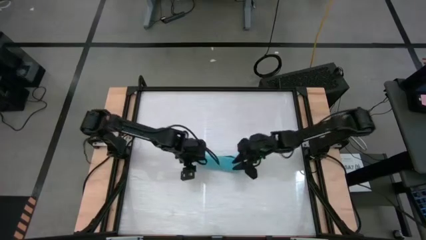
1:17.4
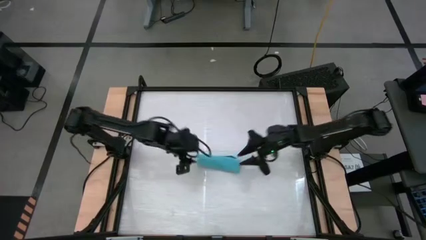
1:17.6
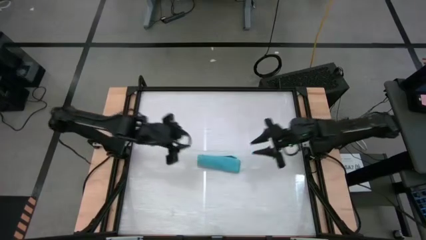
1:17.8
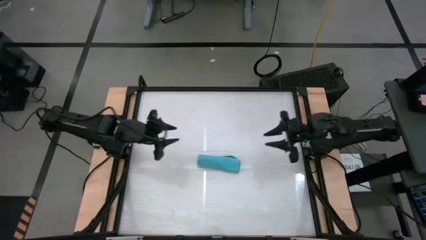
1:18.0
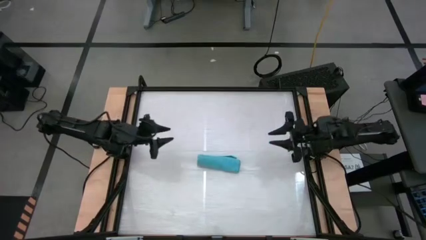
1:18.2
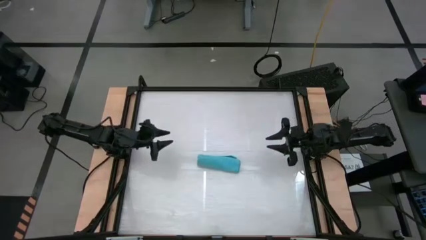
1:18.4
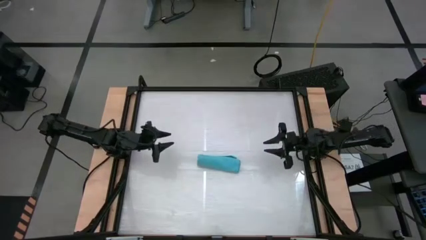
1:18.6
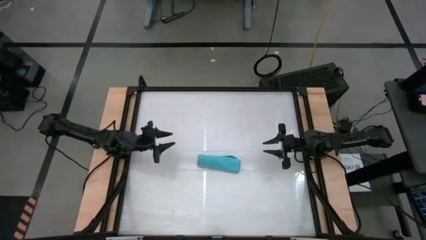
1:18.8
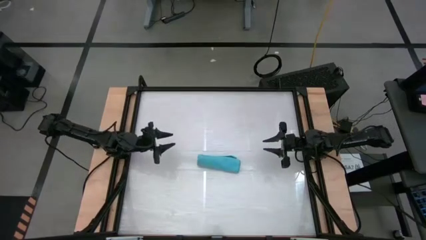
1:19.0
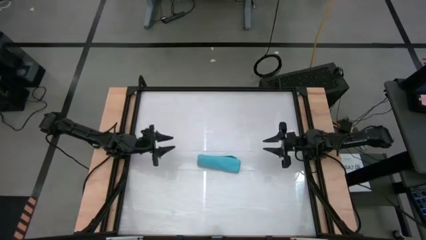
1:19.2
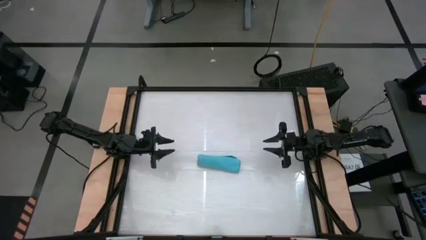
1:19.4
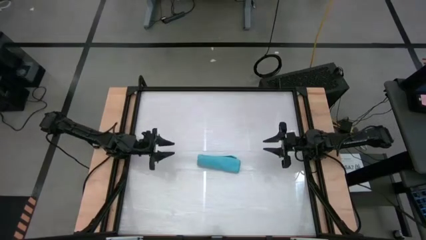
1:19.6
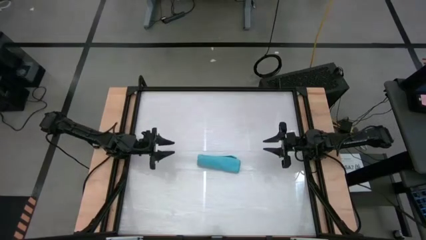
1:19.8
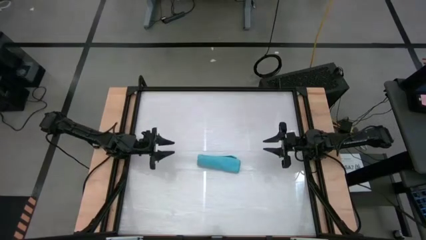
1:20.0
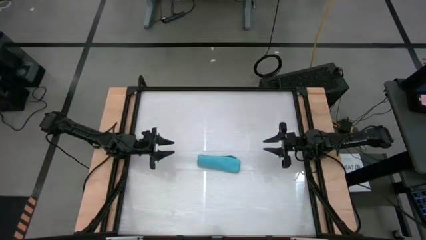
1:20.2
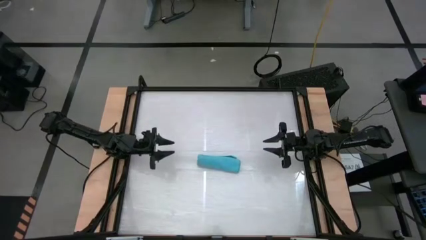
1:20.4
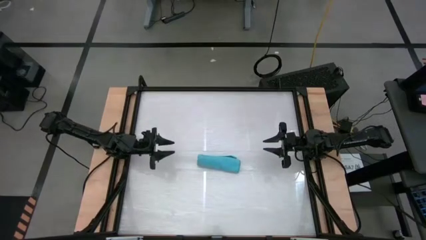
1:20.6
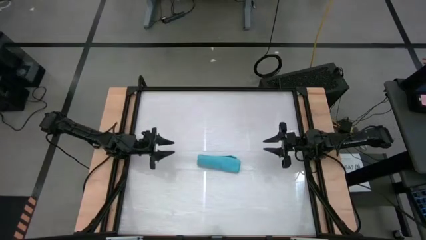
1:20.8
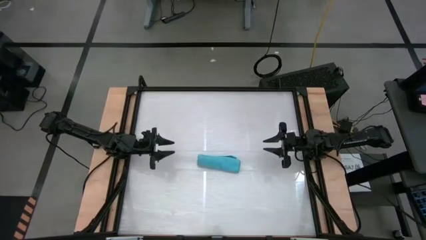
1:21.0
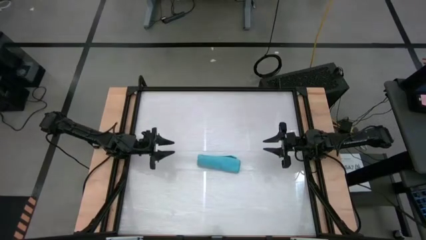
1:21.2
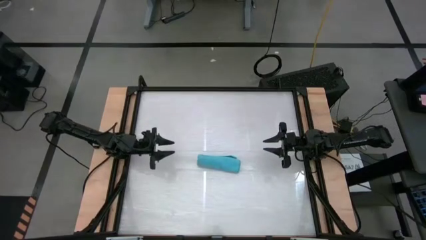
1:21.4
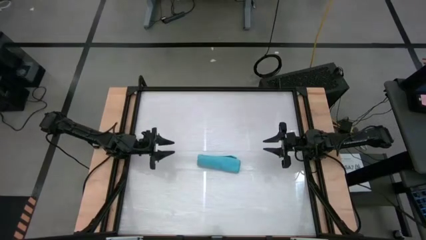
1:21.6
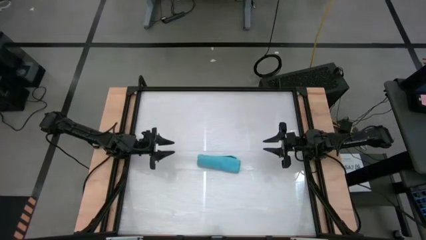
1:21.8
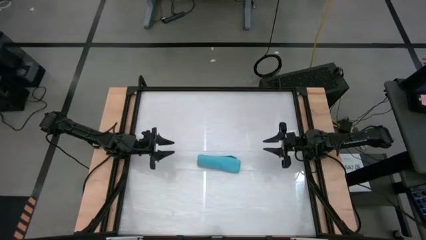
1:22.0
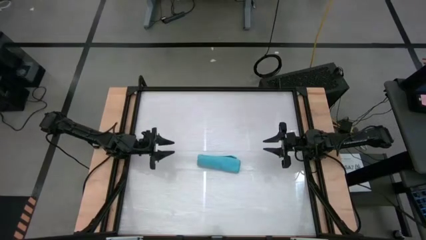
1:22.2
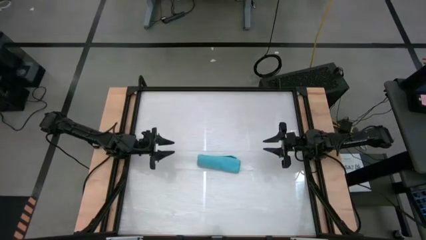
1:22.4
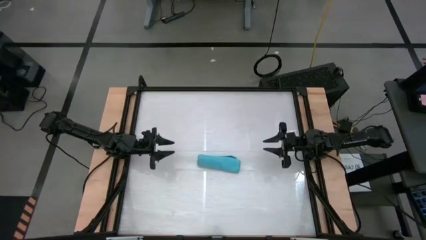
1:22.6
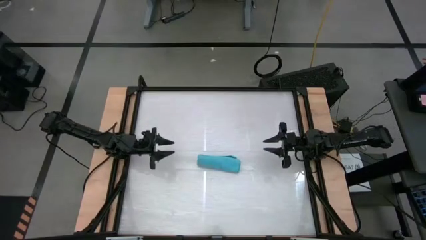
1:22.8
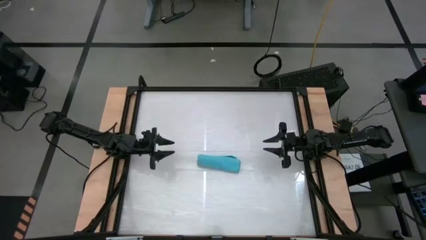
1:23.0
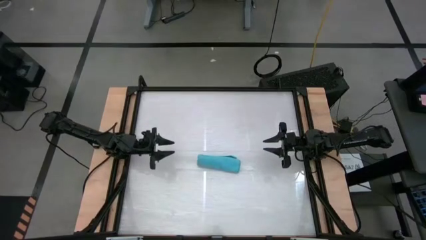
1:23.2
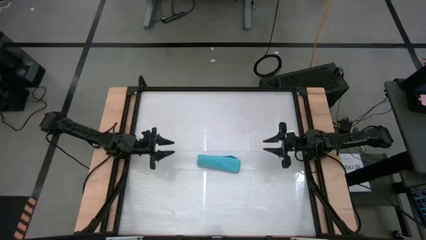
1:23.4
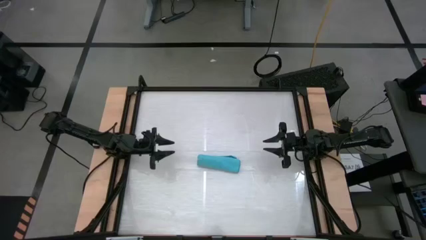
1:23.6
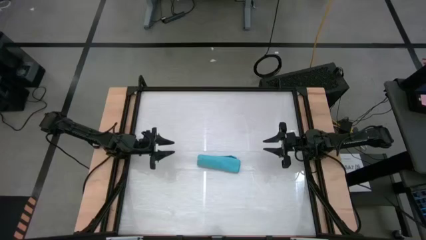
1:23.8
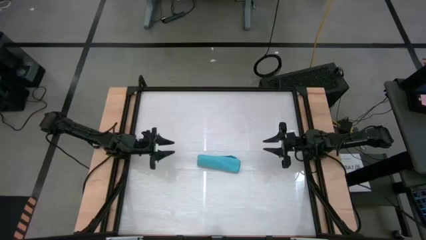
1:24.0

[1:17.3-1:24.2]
Task: Roll towel
Return to Home Position

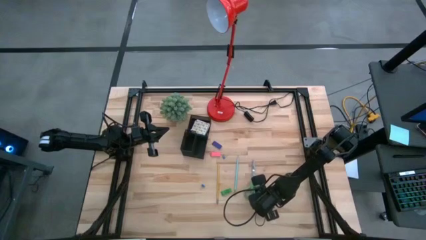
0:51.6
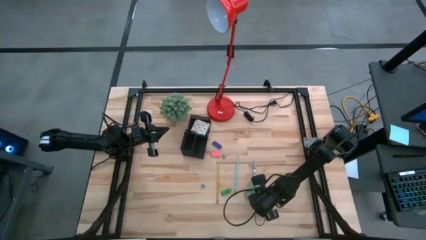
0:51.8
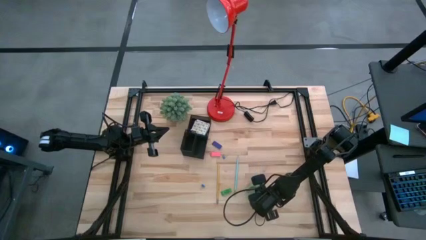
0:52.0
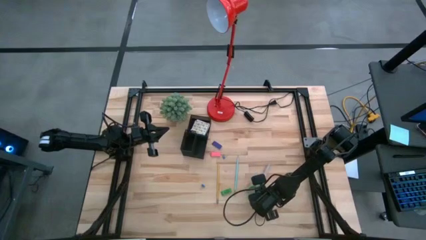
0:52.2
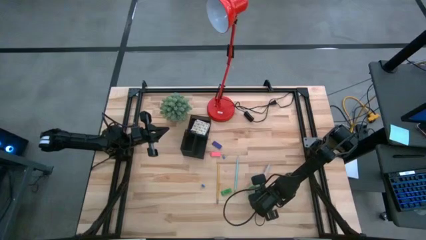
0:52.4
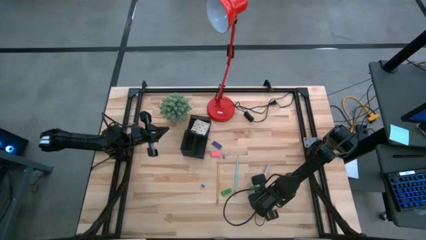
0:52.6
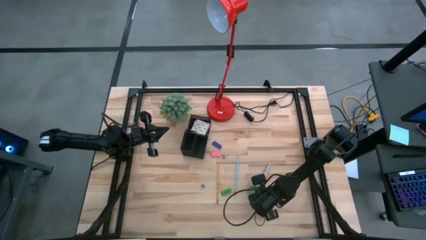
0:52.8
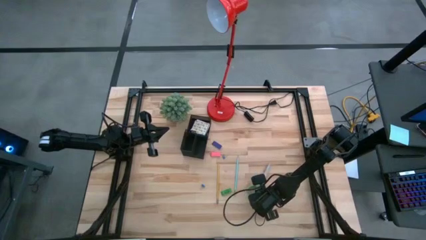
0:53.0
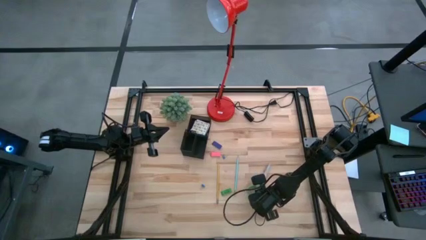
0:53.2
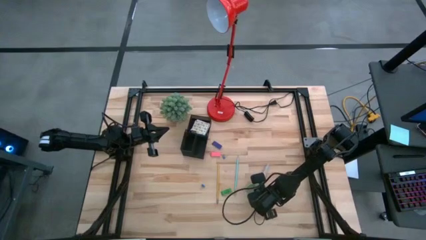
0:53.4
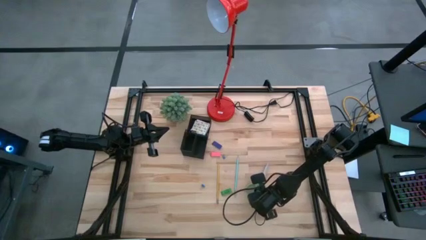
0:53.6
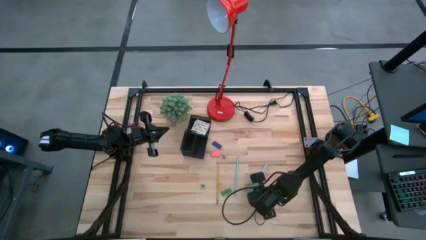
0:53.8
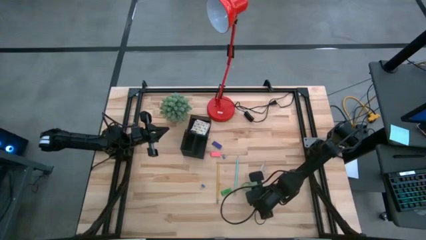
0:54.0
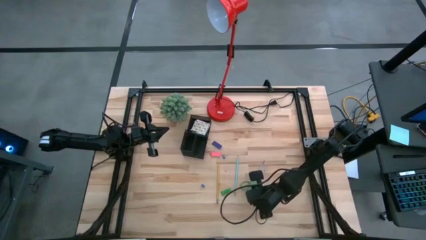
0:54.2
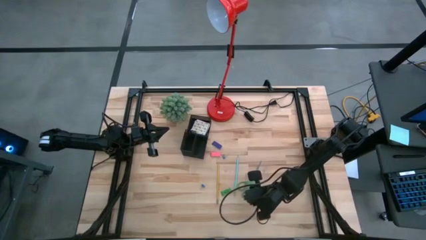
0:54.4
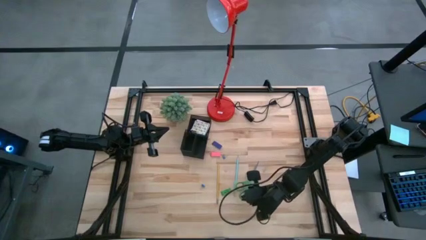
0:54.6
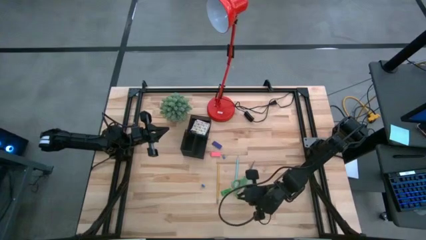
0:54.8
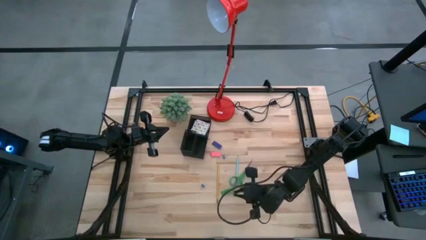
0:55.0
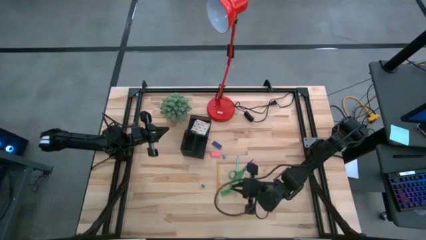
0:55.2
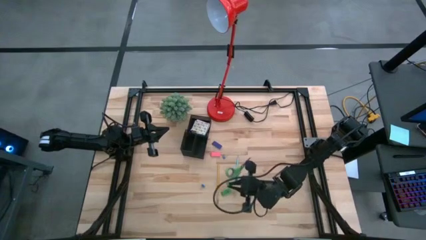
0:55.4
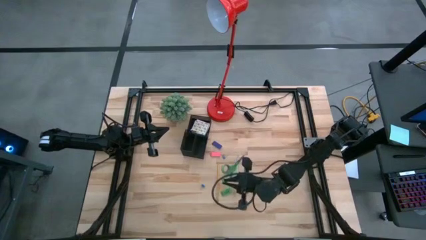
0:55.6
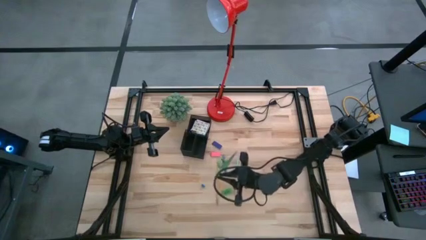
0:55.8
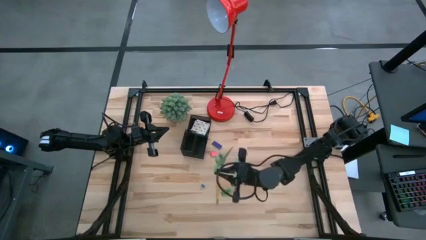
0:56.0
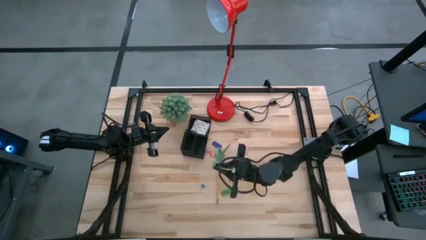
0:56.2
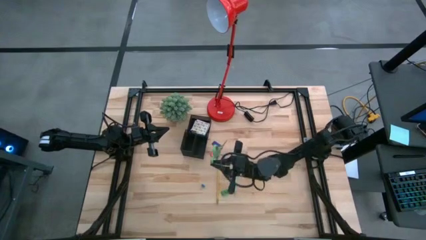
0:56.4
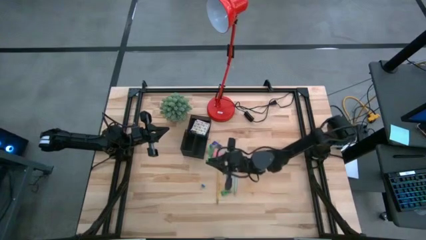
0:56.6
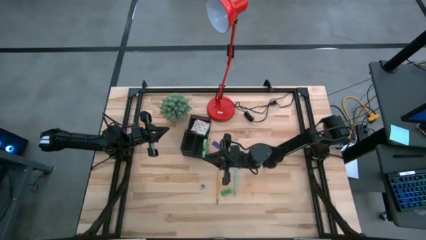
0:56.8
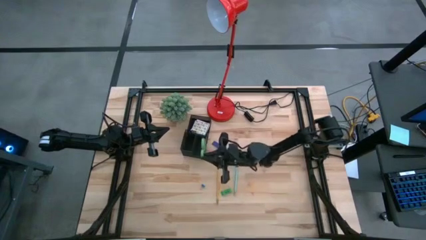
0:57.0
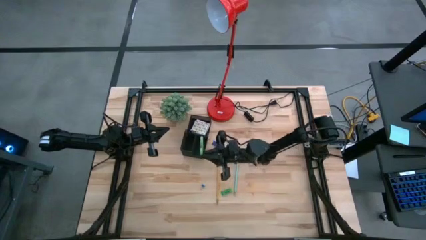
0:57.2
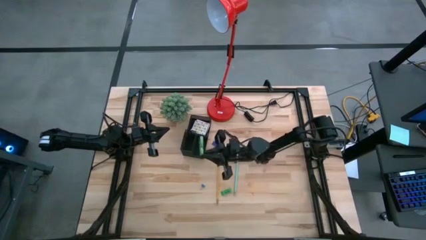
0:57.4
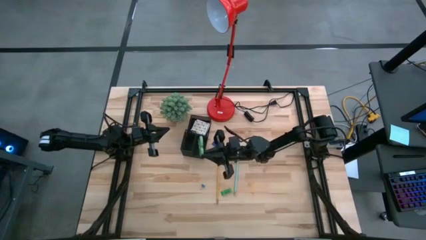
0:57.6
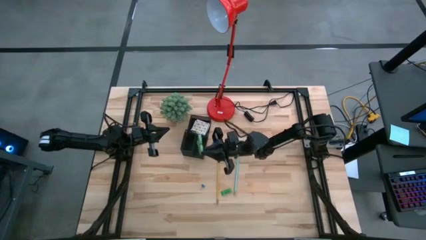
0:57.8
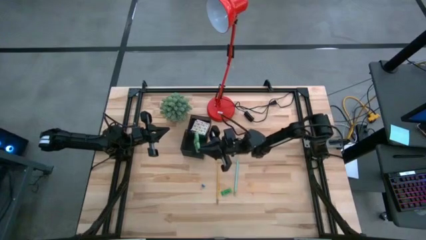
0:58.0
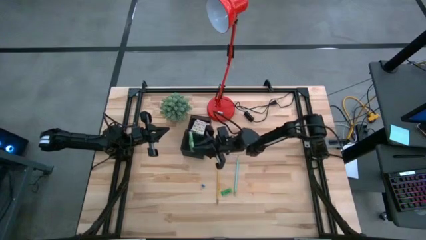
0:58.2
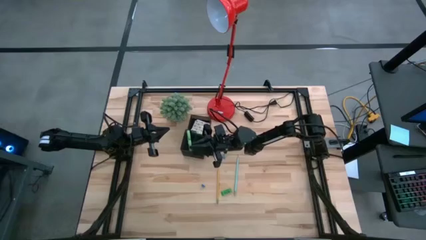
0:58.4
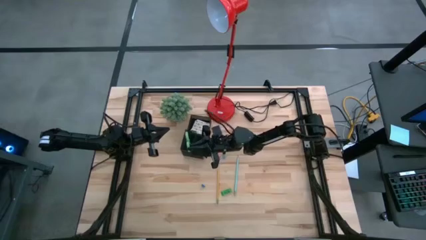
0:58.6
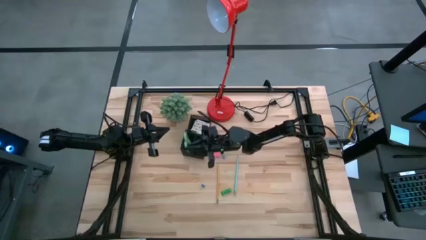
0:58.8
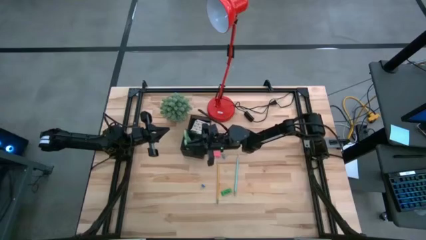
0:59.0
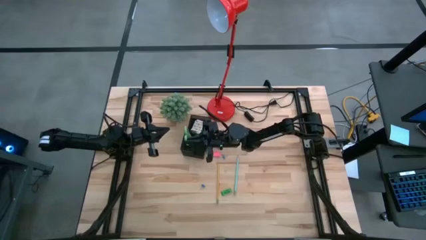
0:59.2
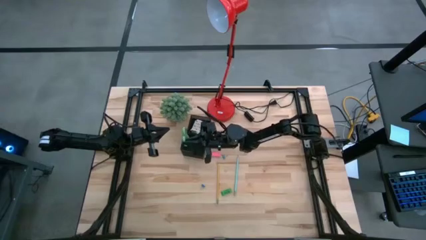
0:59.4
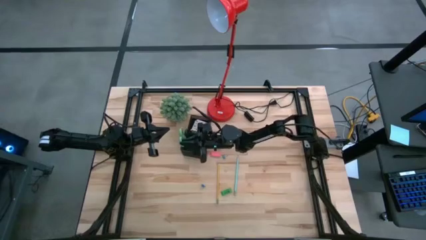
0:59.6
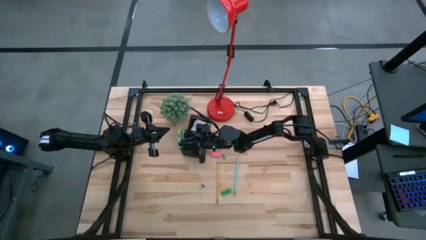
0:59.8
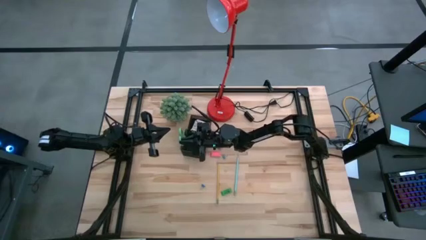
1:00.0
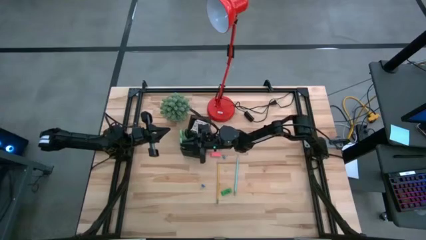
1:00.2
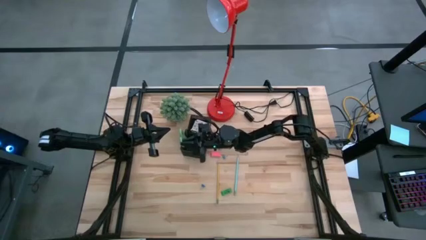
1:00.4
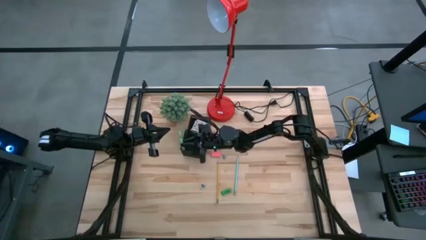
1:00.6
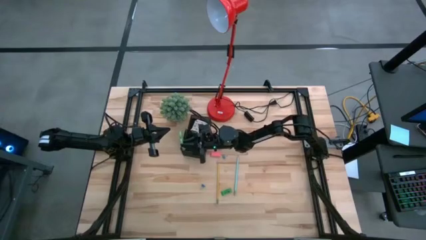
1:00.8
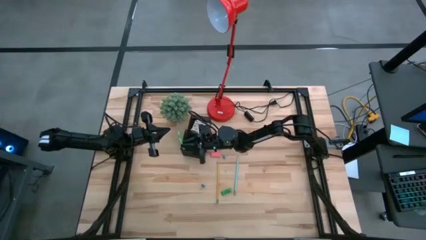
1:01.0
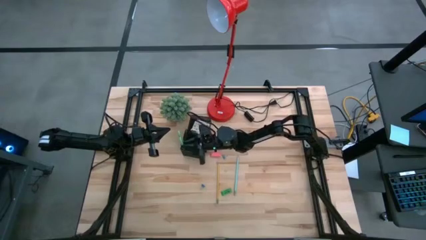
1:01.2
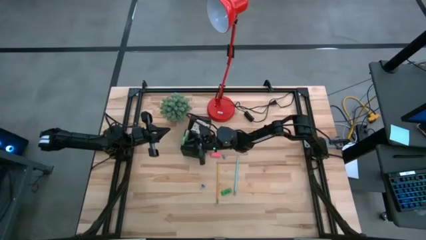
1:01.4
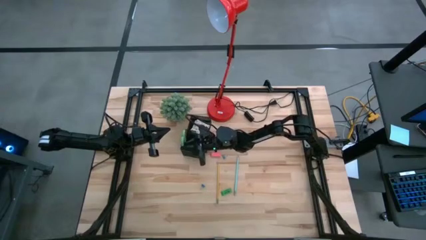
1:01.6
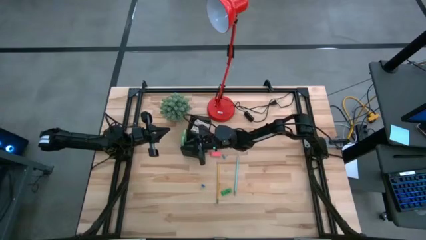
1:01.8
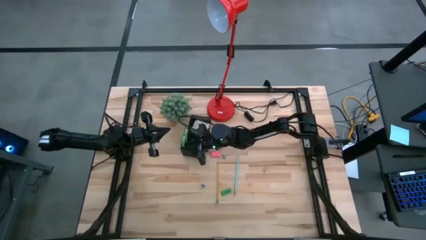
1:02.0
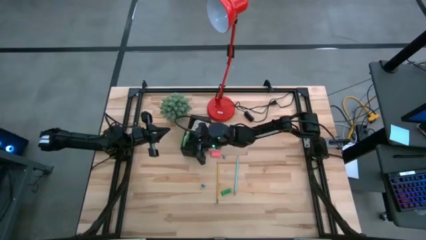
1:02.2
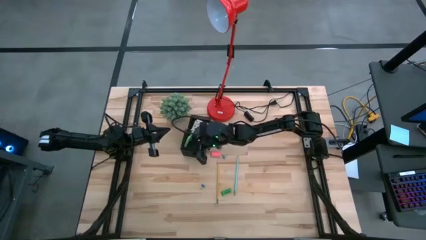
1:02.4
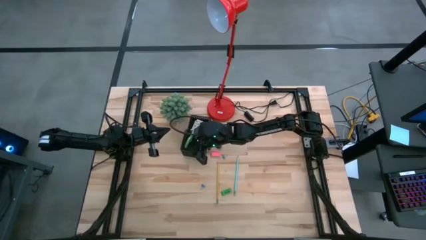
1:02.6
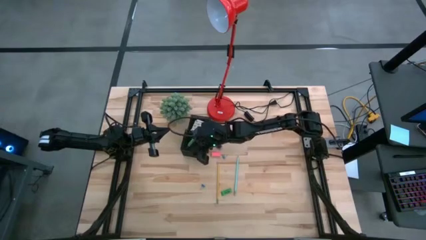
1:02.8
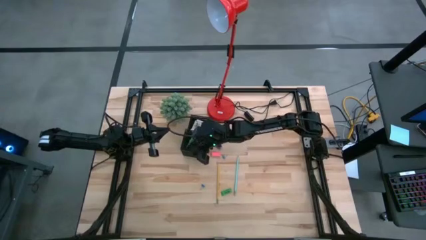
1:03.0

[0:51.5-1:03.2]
Task: Pick and place office supplies into organizer
Put the green scissors in the black desk organizer
